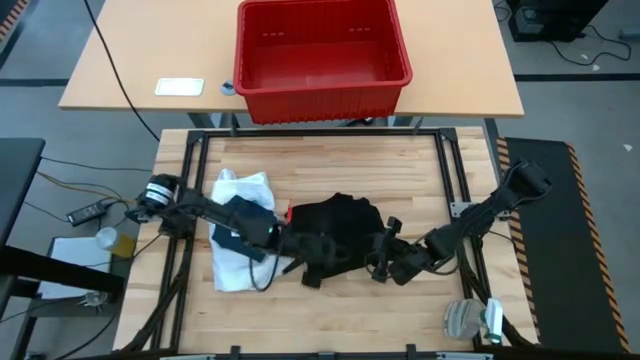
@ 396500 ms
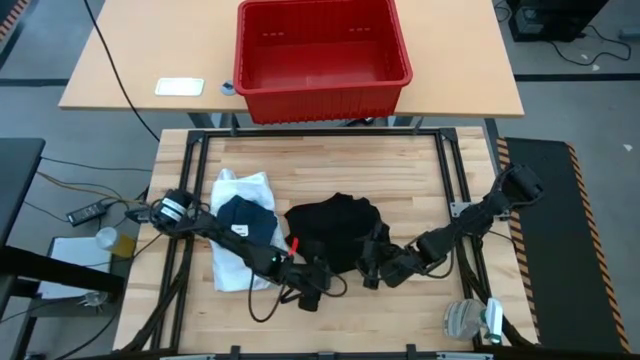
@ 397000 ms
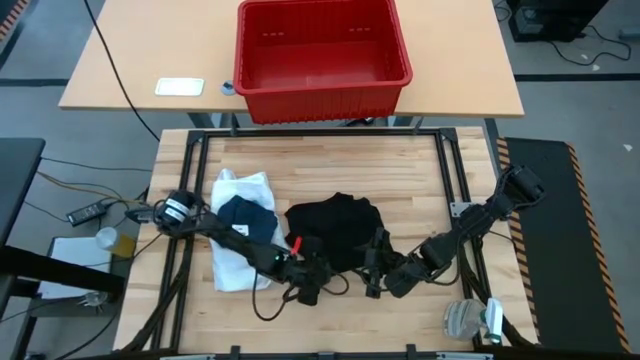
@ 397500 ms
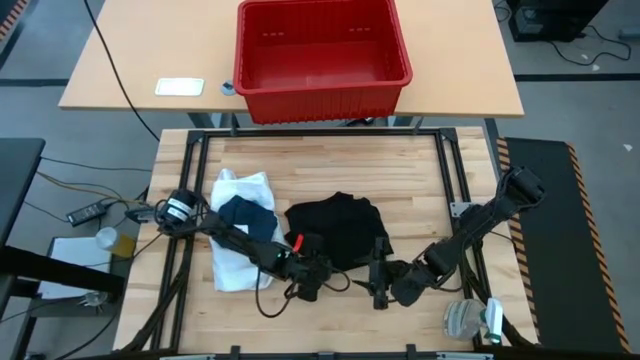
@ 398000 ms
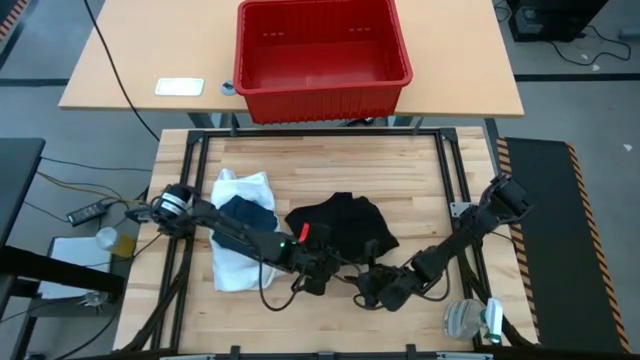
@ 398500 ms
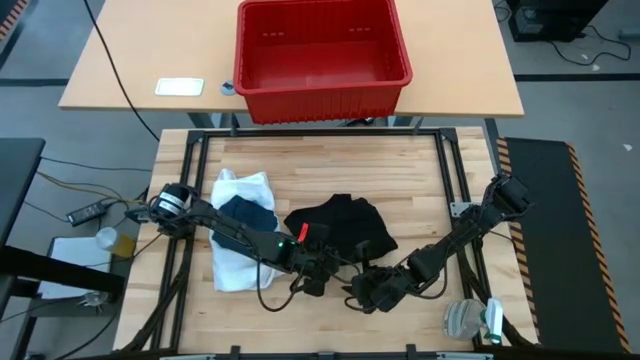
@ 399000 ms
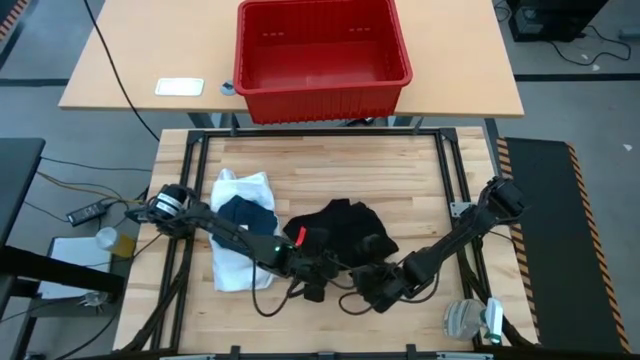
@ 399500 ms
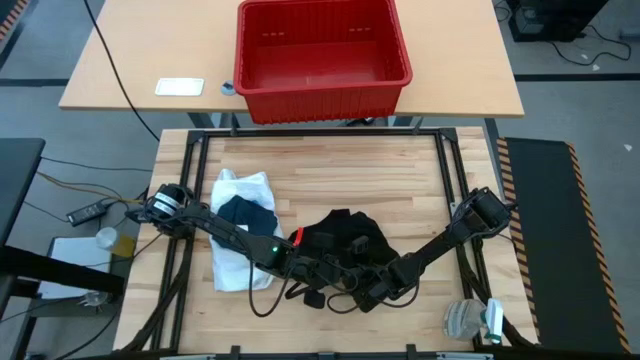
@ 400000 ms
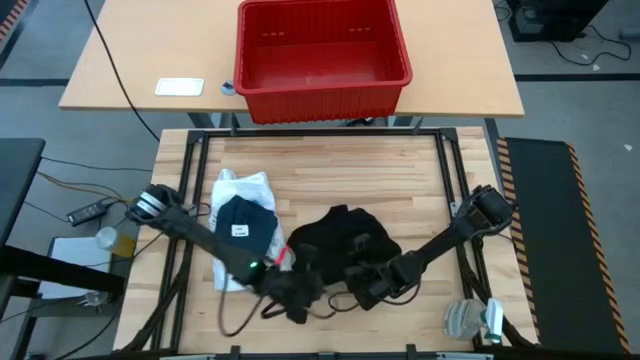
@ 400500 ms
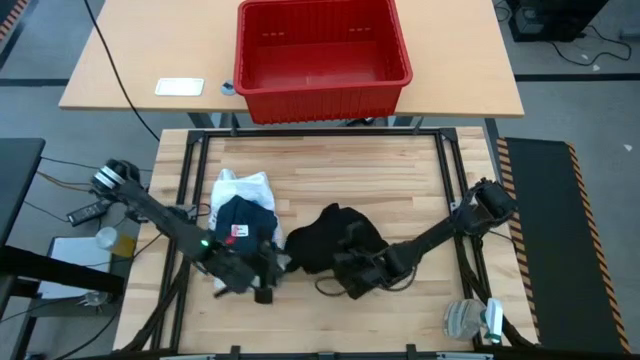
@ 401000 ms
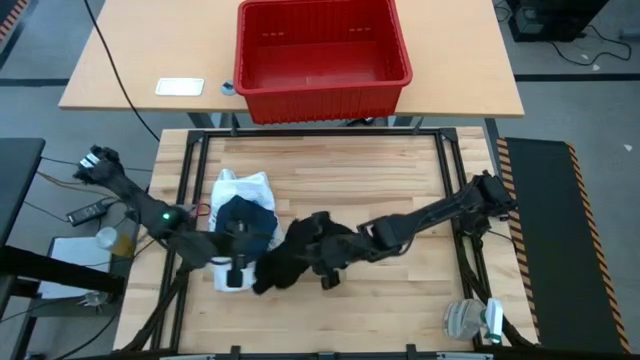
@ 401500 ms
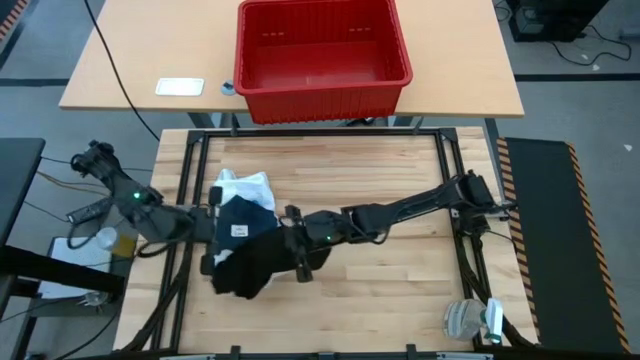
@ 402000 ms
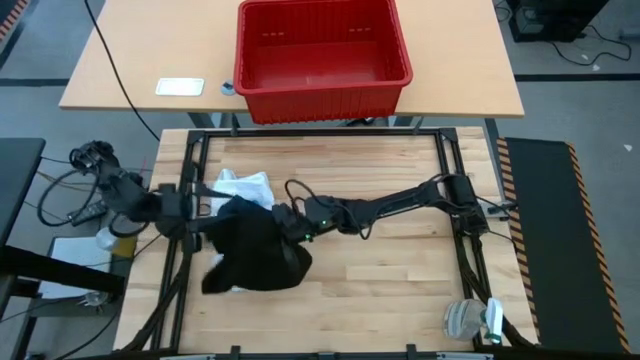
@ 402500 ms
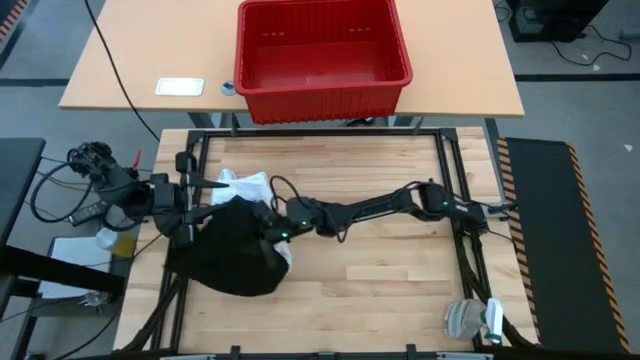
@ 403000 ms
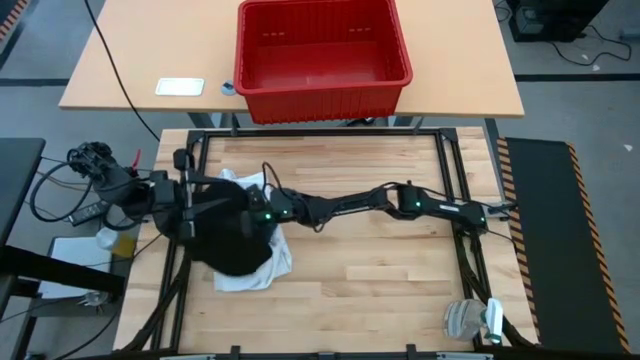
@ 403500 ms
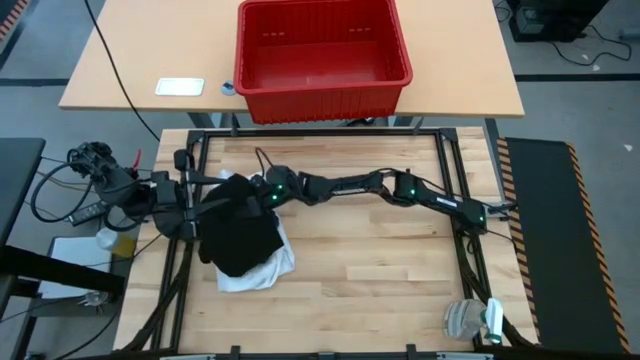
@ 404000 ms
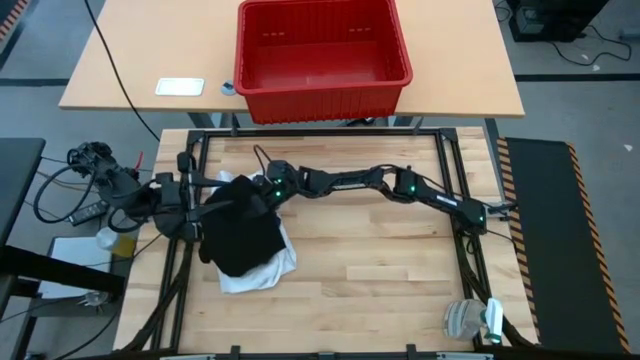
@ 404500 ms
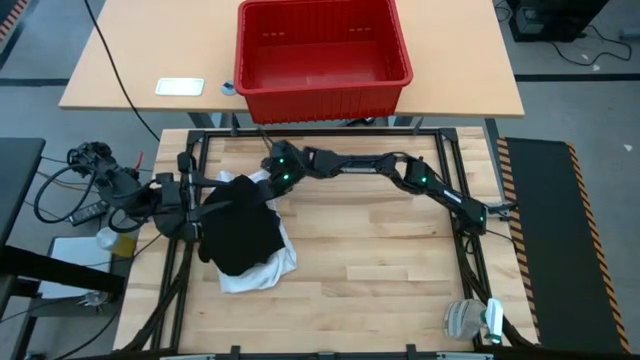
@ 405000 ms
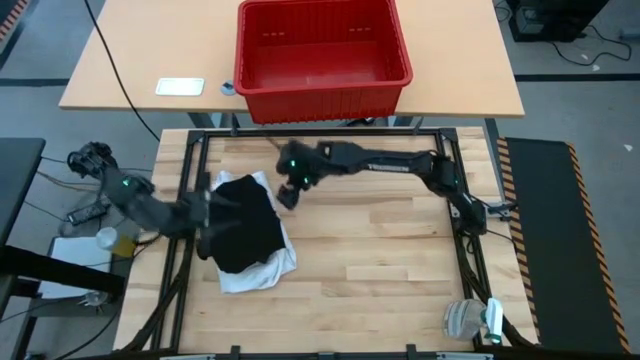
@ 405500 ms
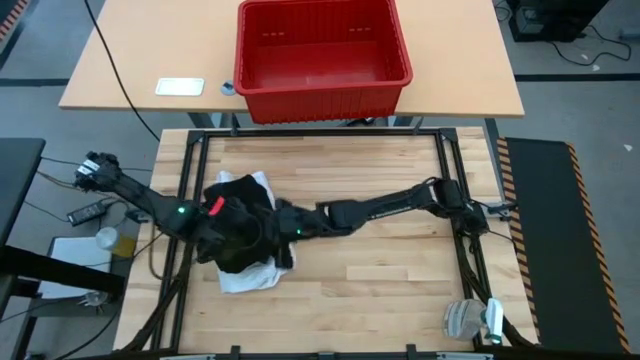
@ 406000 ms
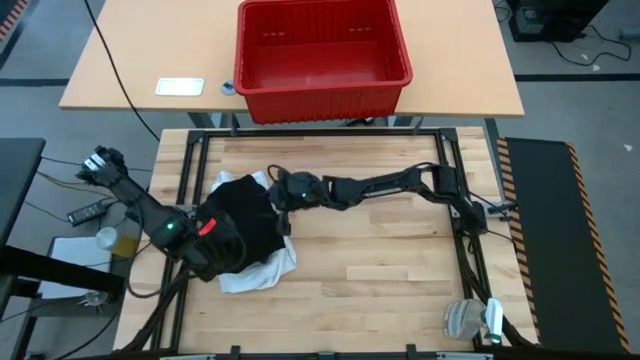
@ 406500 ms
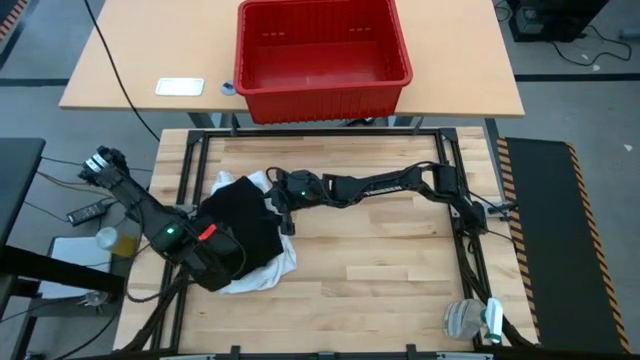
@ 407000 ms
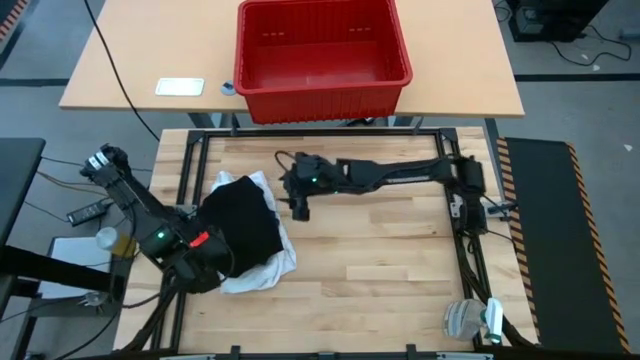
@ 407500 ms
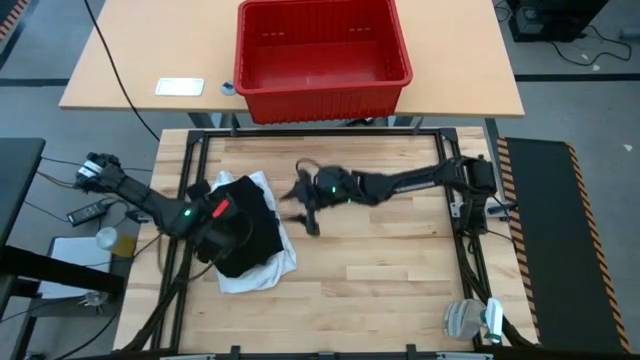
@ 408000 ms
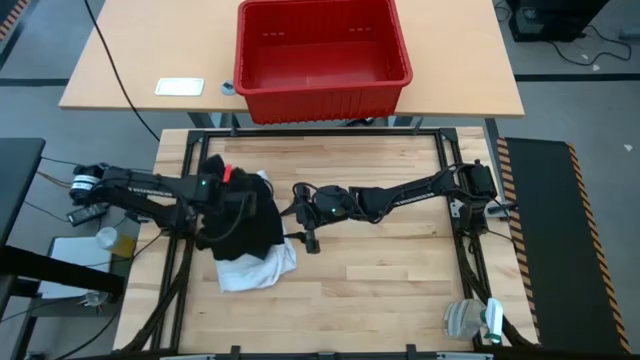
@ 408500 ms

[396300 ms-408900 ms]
Task: Fold laundry
Stack the folded black shirt on top of the folded dark blue underwear

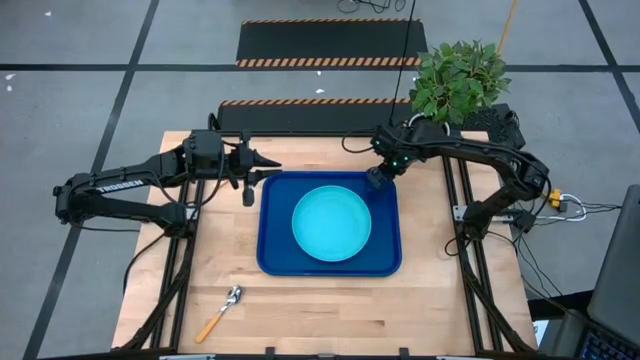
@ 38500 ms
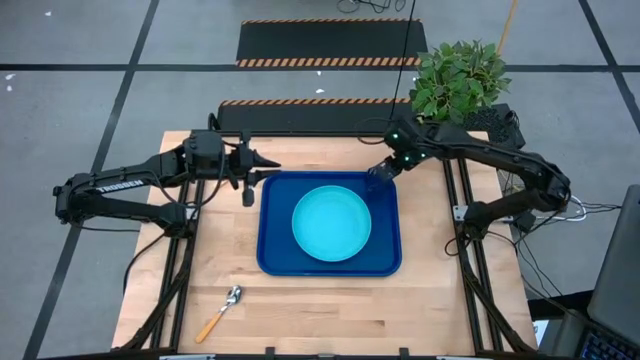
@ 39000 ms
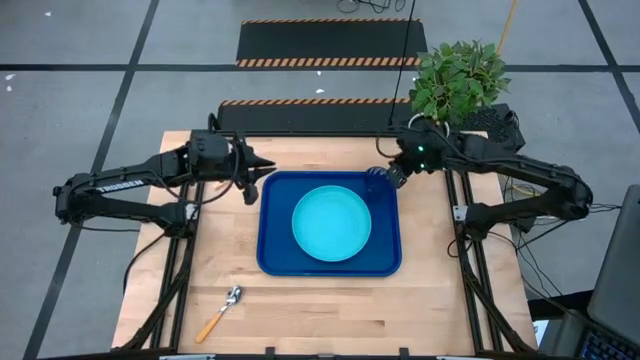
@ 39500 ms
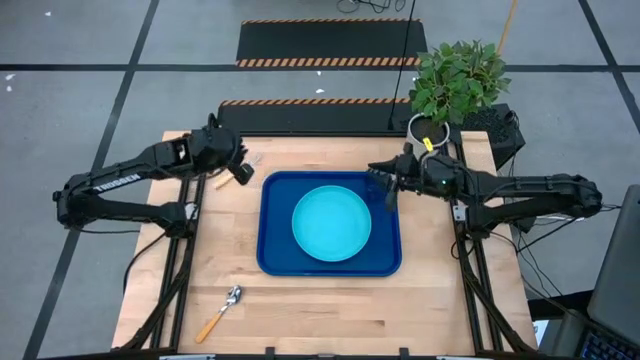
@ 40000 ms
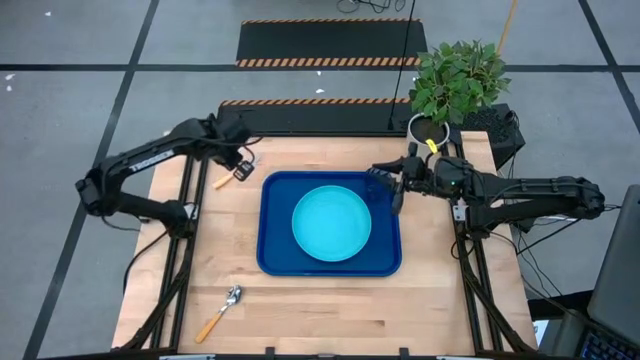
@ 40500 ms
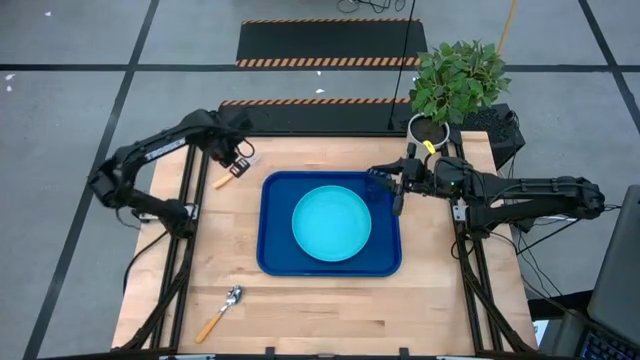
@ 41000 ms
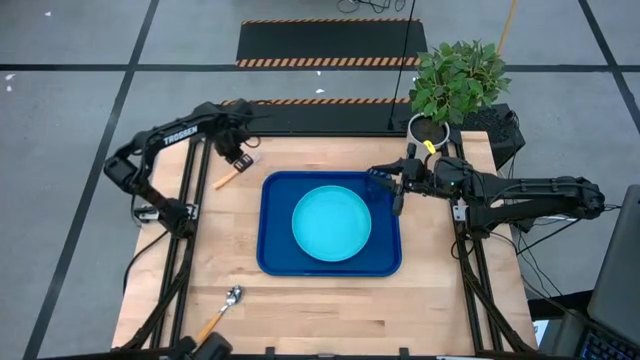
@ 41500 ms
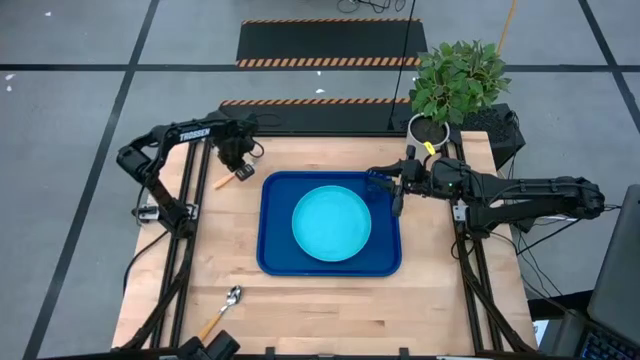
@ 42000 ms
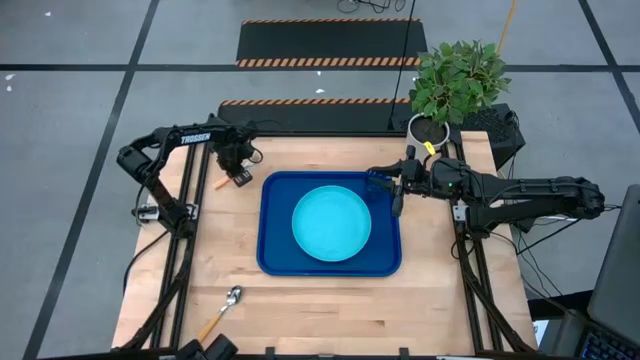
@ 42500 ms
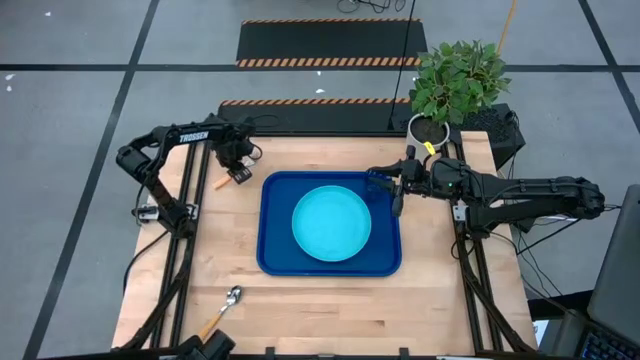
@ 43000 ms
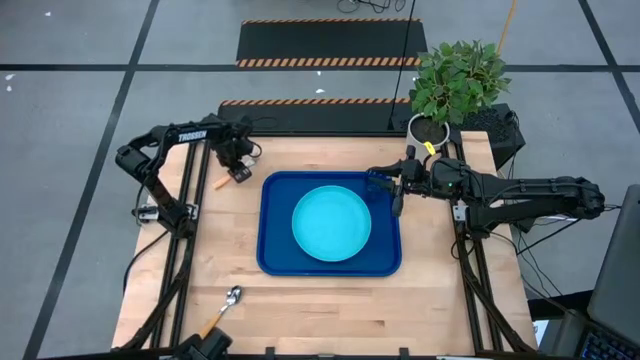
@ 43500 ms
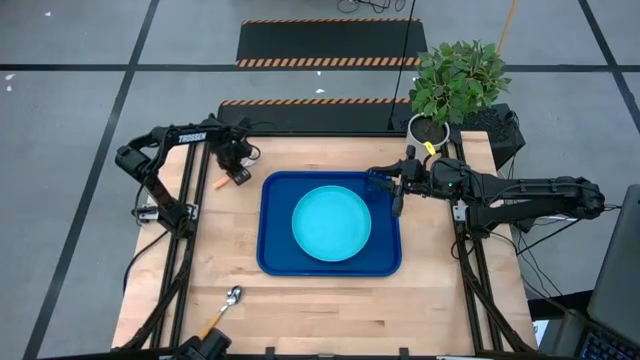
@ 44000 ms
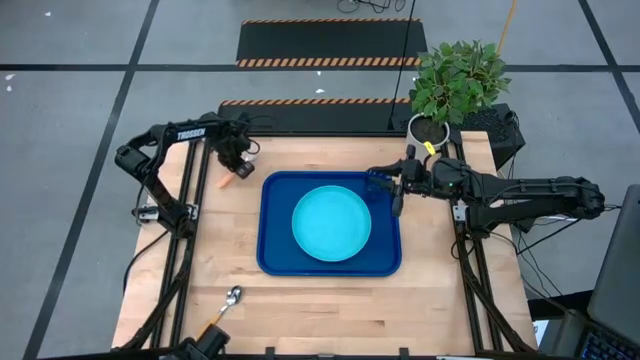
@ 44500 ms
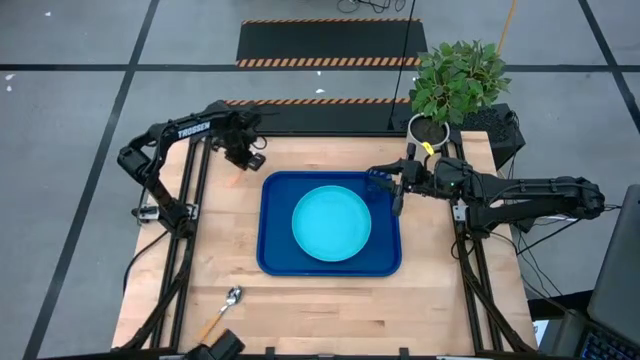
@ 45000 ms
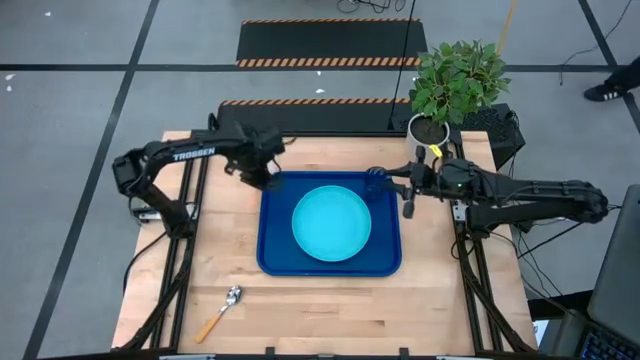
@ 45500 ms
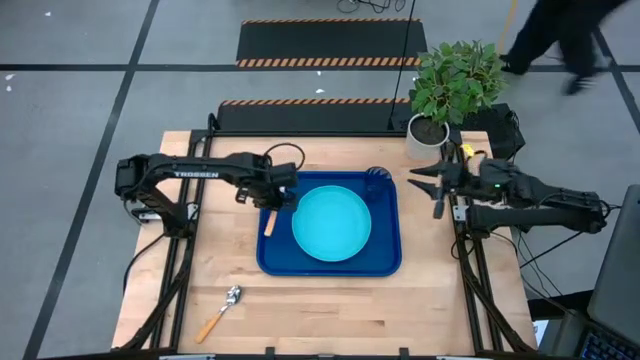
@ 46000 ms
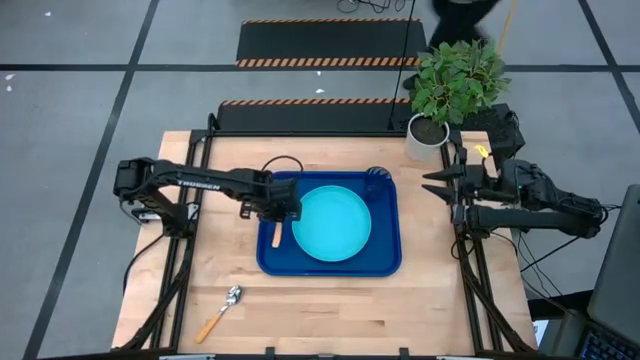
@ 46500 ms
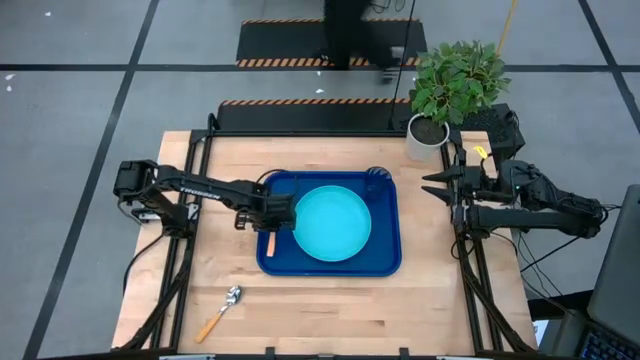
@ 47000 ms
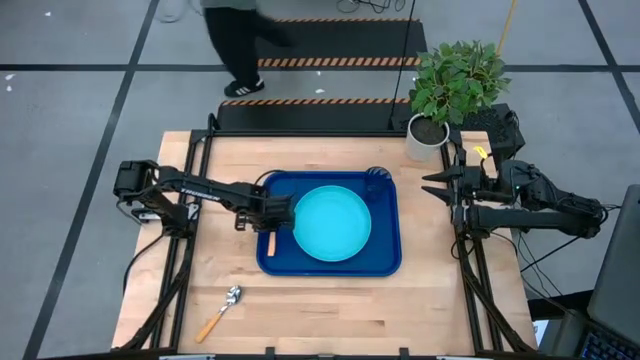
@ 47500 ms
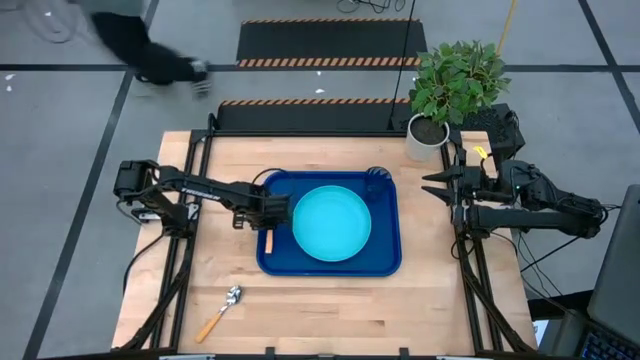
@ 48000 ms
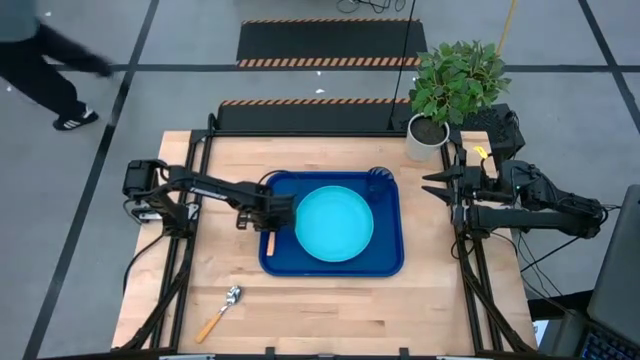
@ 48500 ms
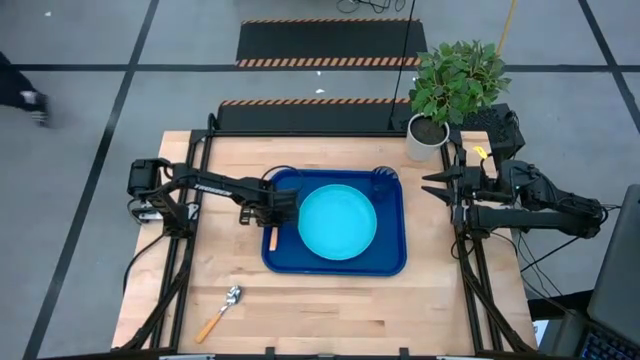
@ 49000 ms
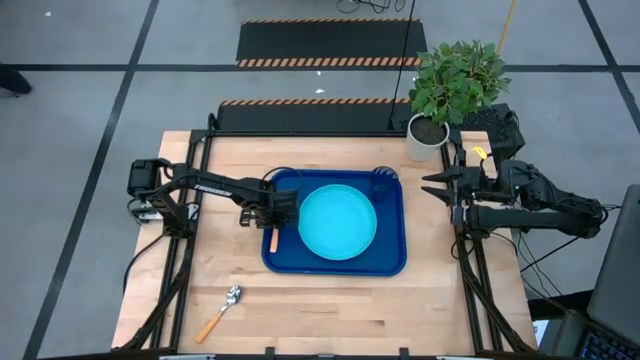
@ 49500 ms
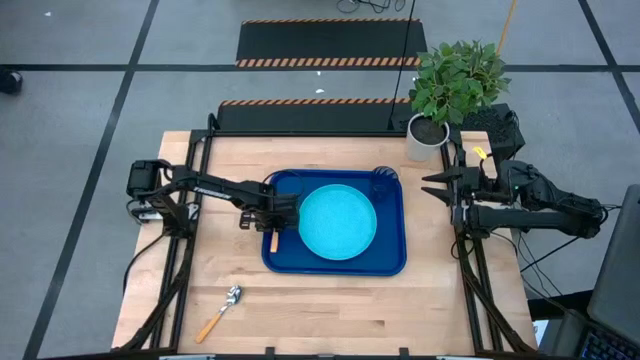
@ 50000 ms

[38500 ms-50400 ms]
Task: Pick and place plate/cup/fork/spoon on tray
Put the light orange fork on the blue tray to the left of the light blue plate
